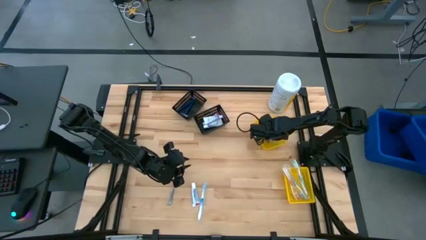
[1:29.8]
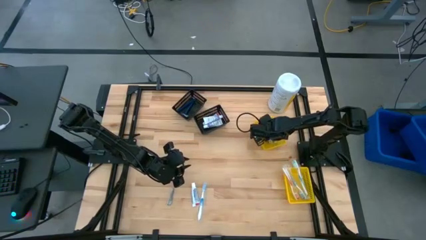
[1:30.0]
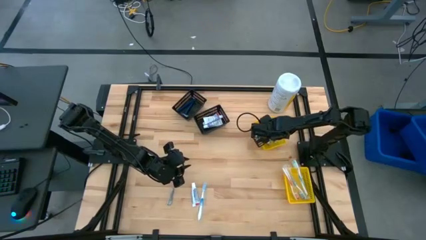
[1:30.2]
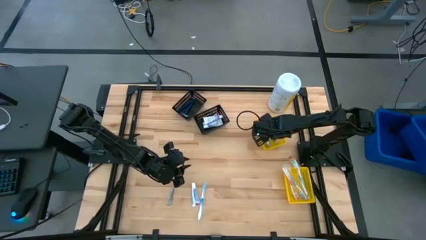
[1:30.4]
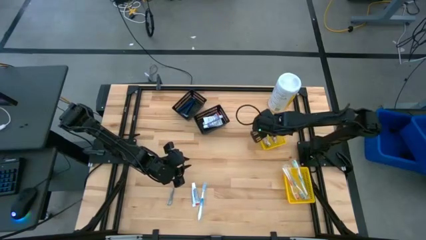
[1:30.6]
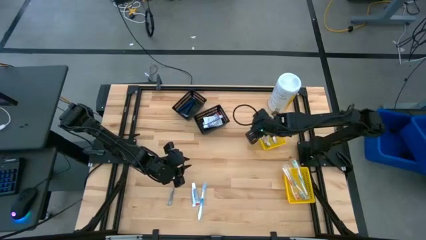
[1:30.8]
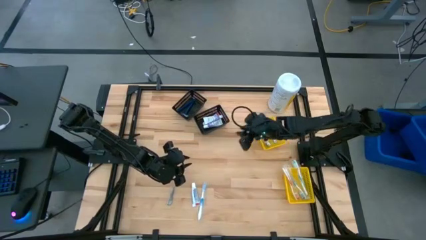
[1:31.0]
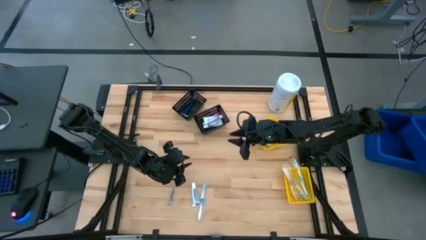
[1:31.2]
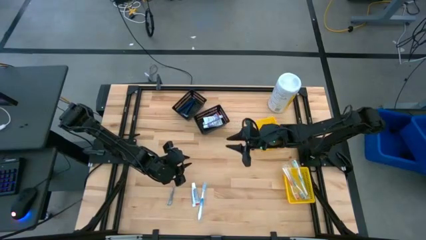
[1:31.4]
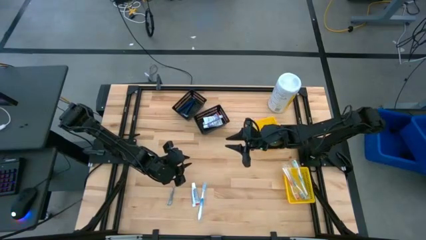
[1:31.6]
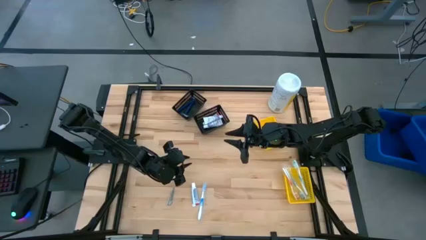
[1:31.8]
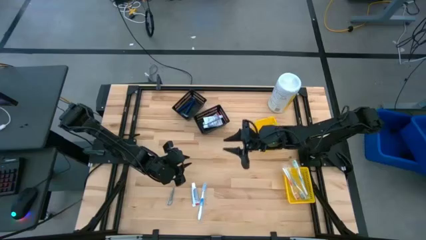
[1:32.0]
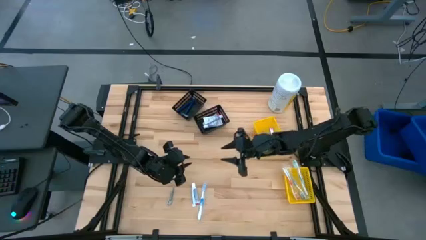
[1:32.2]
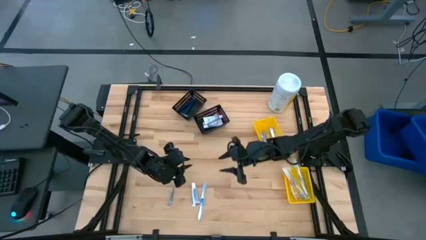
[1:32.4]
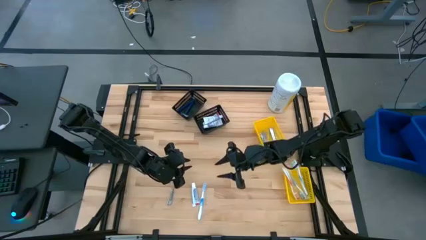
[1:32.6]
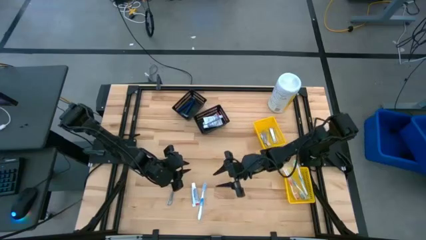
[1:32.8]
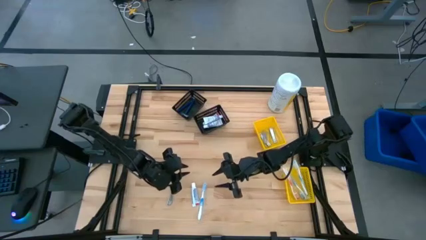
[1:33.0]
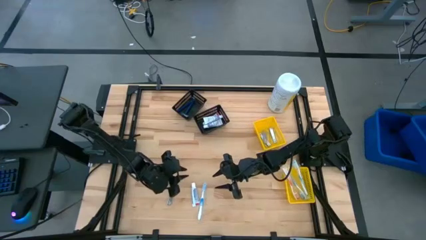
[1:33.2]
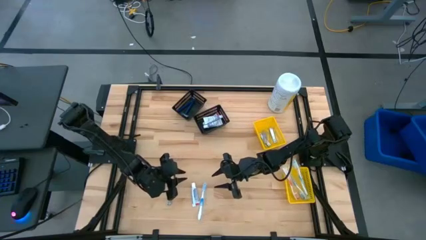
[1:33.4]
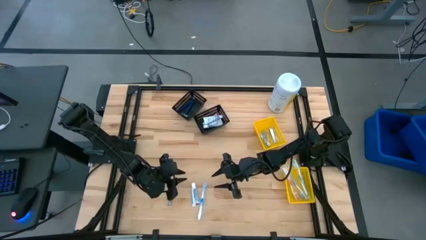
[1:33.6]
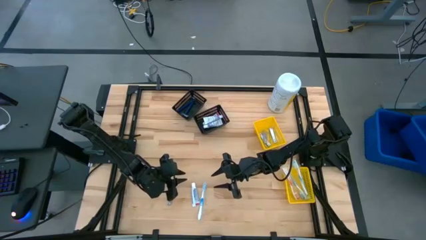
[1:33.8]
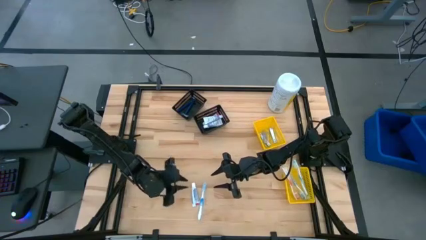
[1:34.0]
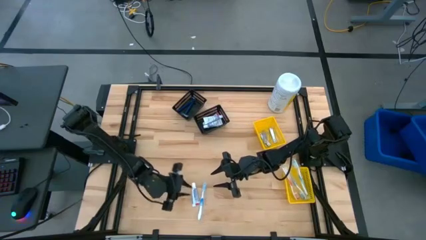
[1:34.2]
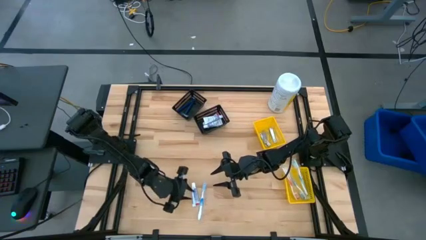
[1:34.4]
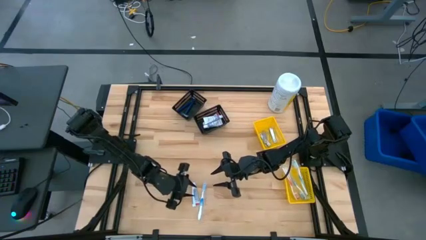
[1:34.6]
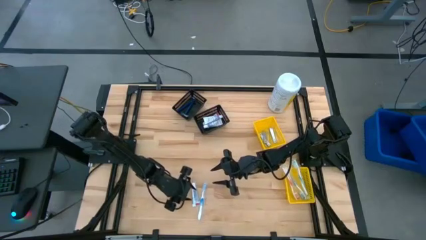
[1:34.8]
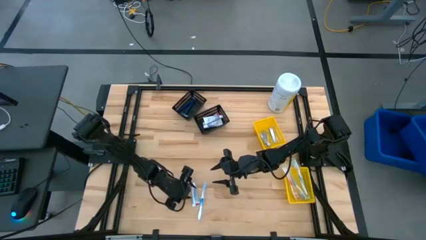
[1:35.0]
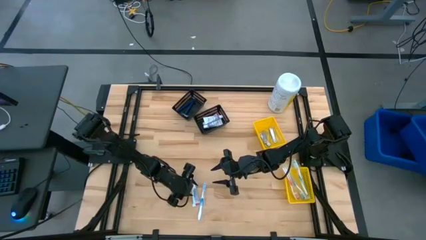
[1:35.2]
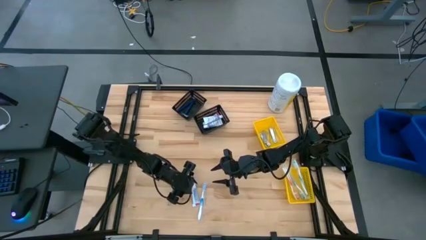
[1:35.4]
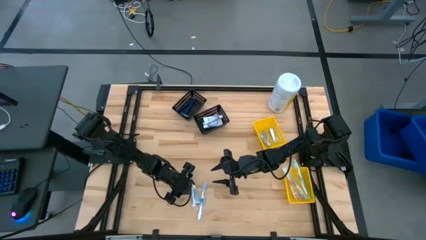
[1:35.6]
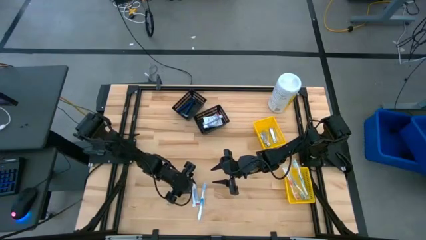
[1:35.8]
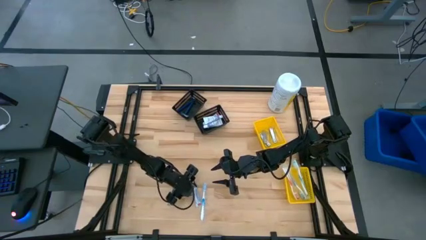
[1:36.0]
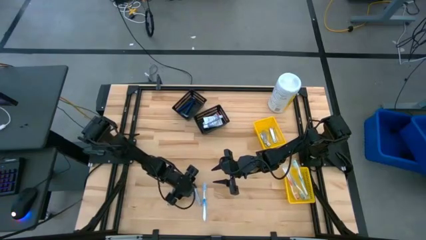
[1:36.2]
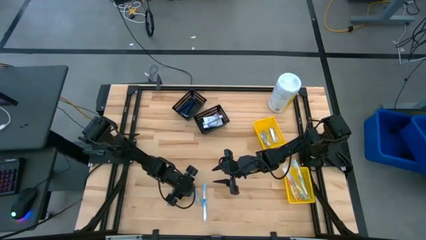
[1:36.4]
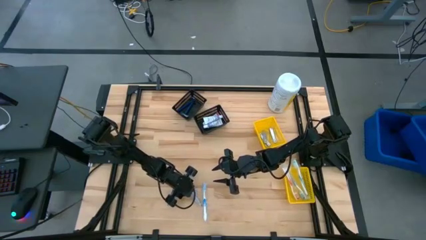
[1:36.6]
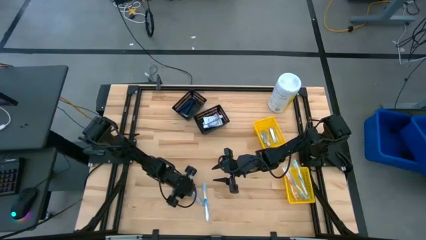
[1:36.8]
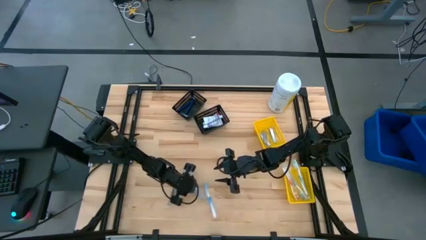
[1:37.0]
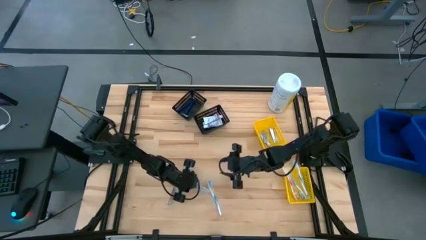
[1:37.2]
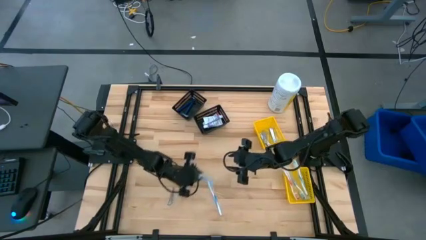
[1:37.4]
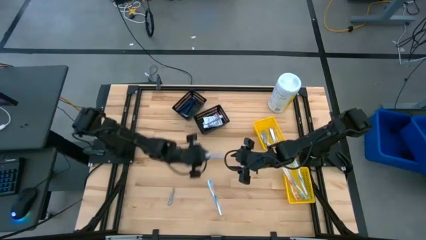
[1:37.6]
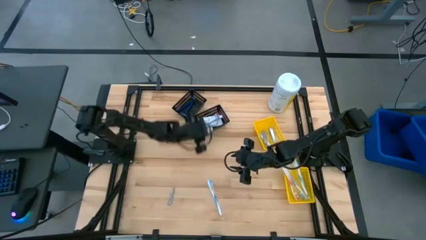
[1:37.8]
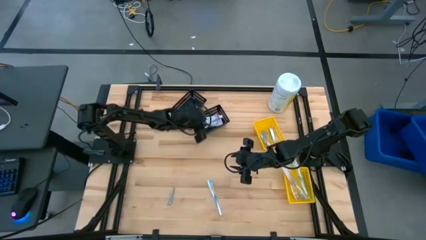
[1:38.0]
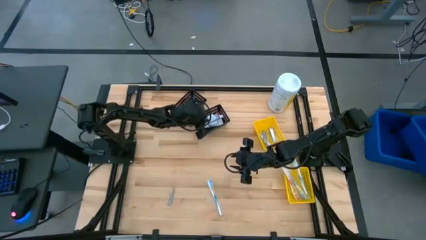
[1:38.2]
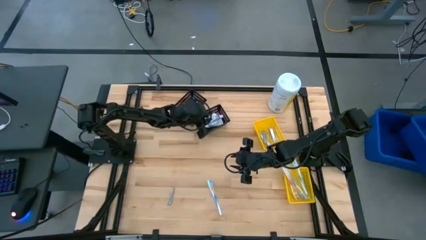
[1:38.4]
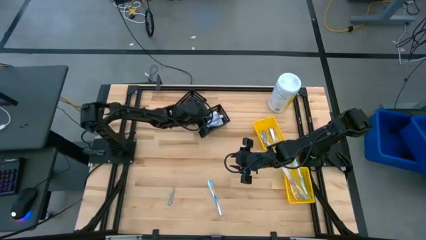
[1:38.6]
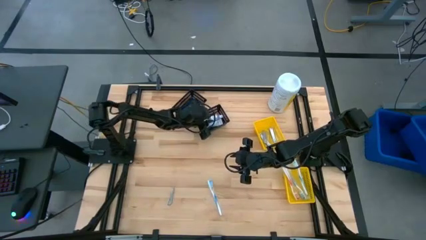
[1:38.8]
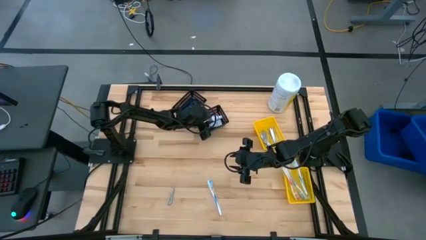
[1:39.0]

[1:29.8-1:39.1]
Task: Pick & Place Travel size toiletries
Put the toothpaste into the bottom black bin

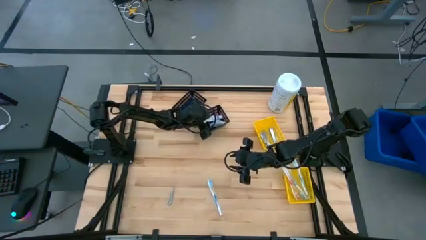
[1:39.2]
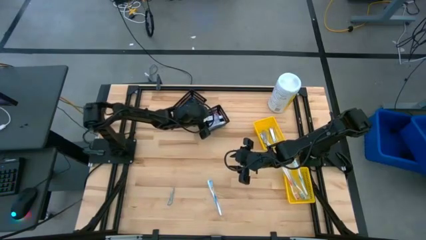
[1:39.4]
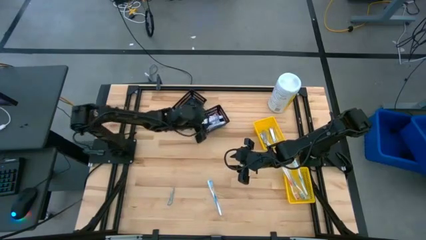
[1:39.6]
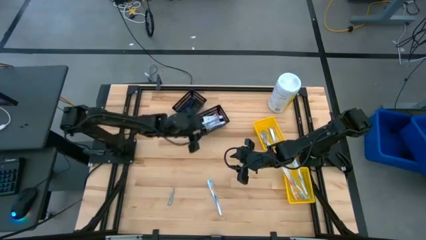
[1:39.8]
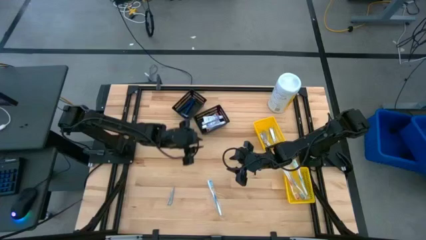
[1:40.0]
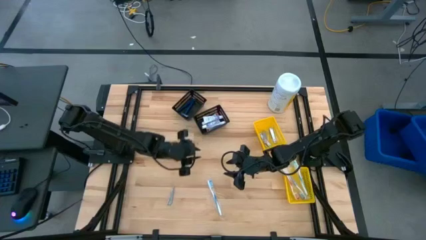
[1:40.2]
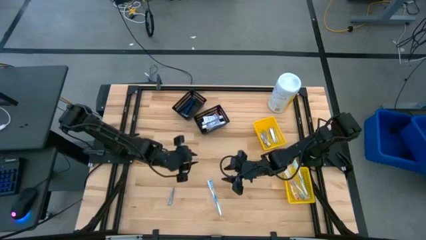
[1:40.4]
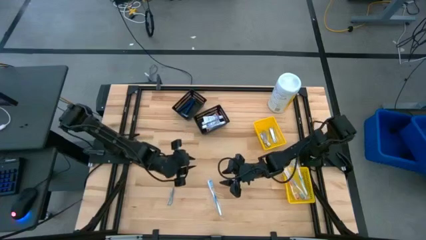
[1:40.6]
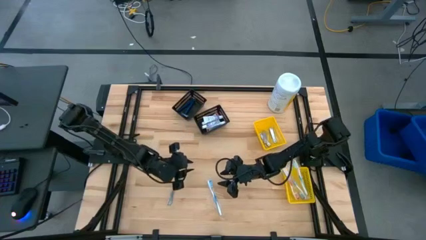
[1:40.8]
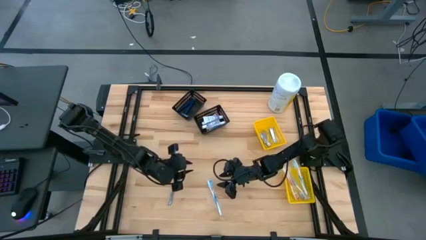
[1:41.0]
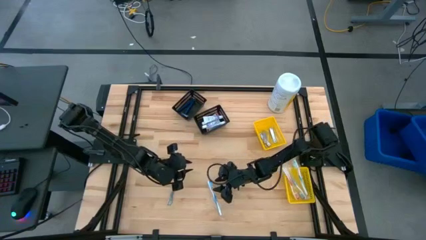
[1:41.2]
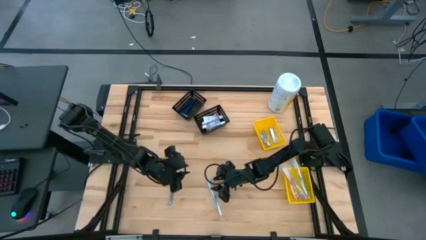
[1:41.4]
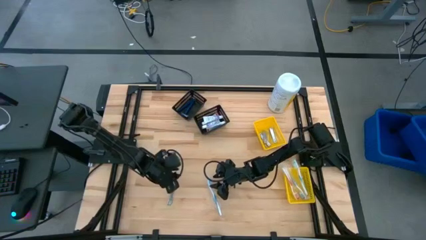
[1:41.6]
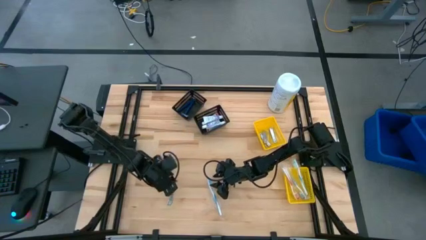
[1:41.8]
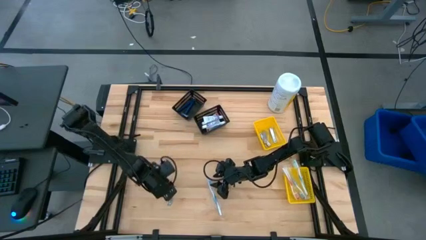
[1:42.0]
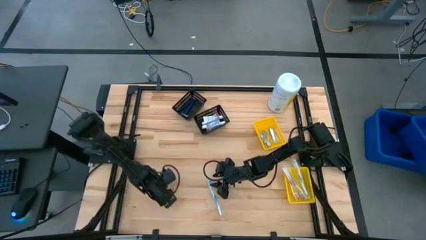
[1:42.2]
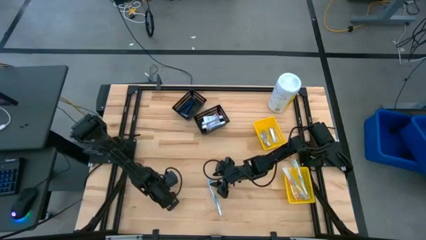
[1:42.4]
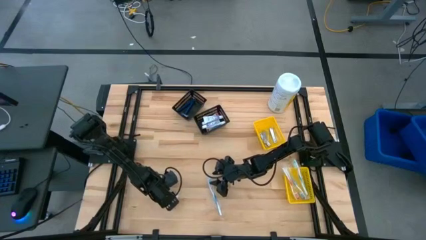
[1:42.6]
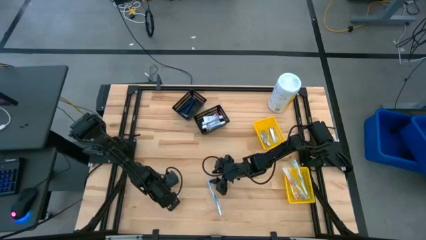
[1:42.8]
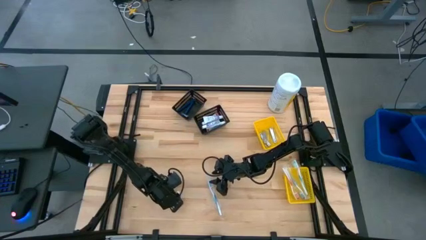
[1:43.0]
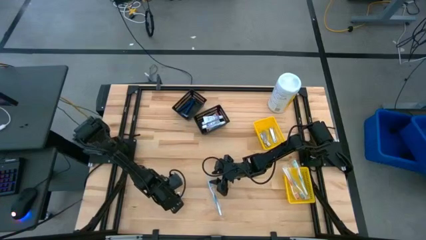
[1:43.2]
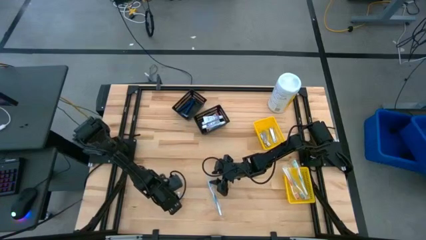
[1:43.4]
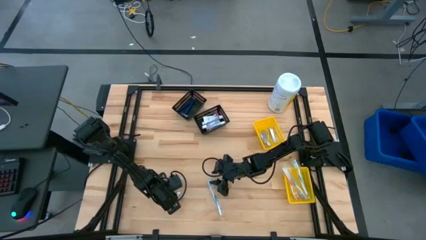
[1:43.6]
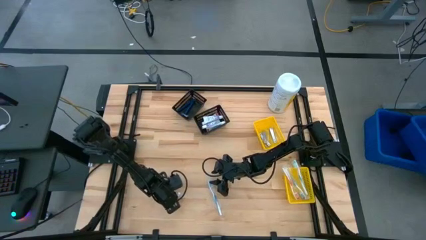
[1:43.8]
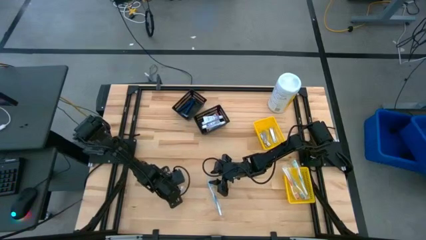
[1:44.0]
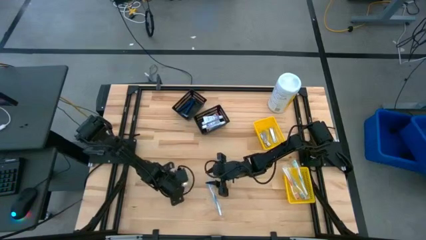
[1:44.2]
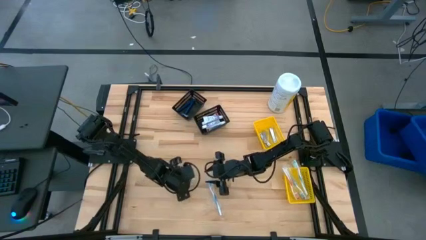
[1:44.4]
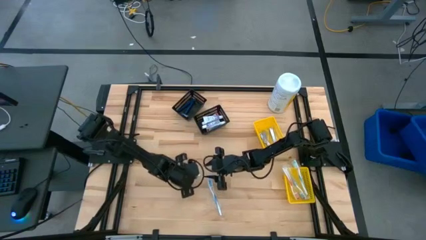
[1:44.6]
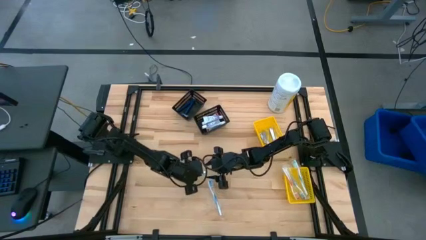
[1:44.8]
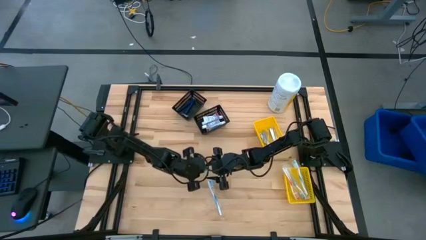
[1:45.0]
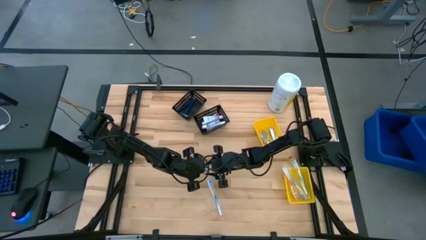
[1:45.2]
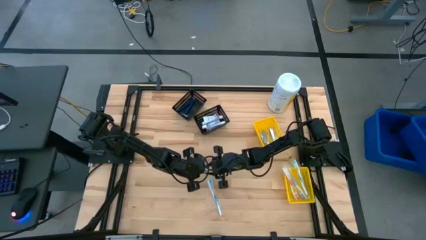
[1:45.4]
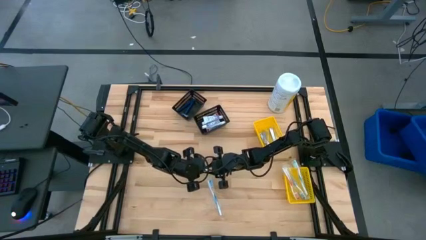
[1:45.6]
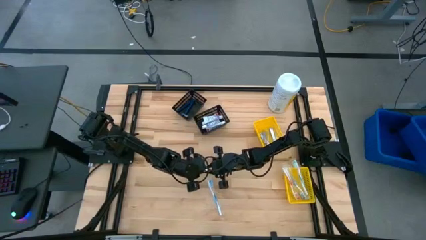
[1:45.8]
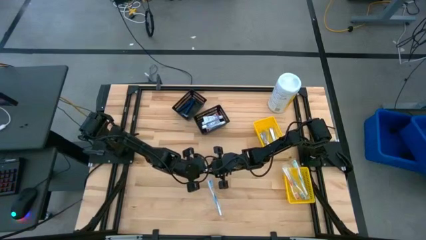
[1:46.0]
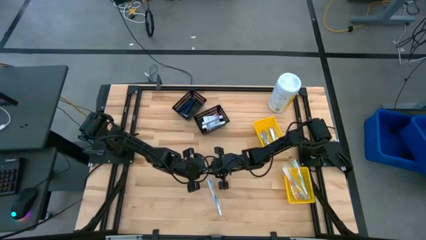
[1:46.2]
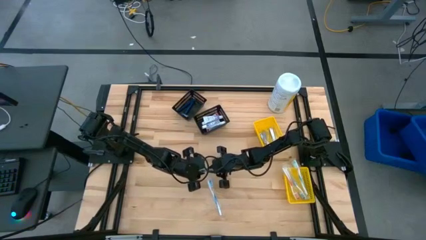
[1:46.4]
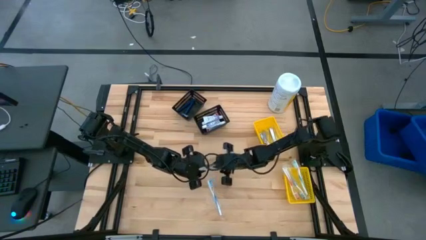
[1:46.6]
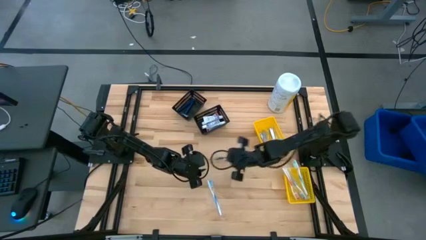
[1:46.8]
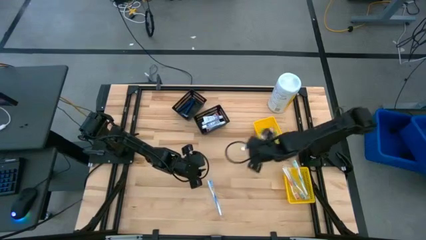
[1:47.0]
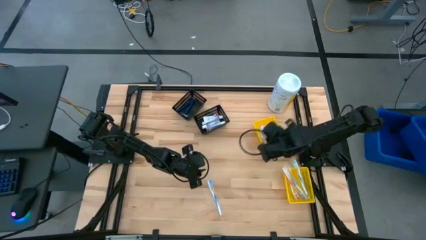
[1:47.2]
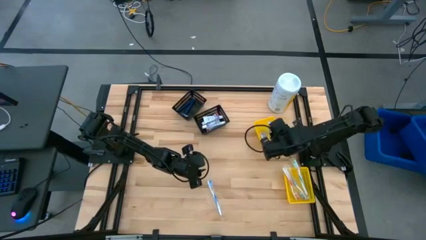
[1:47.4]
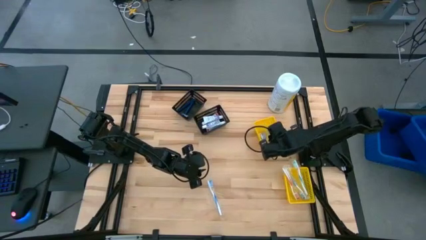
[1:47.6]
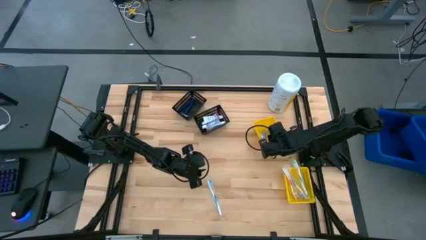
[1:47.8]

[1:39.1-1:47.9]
Put the nail cutter into the top yellow bin
